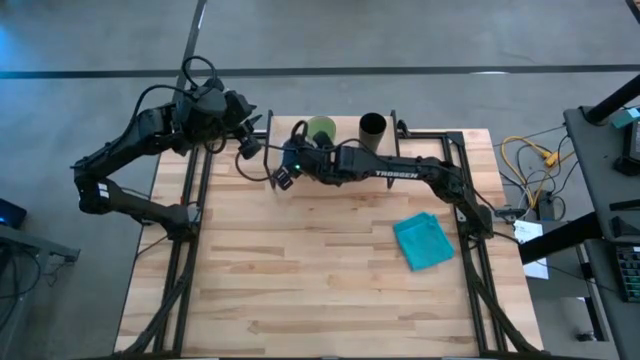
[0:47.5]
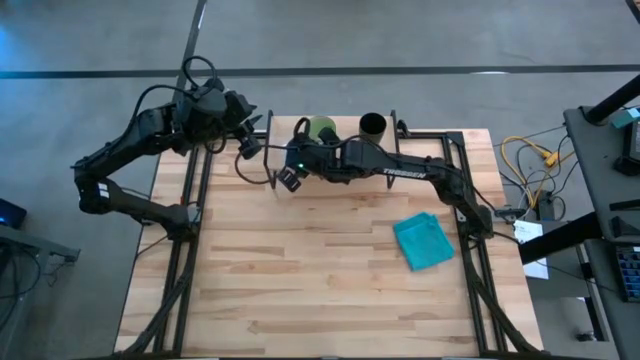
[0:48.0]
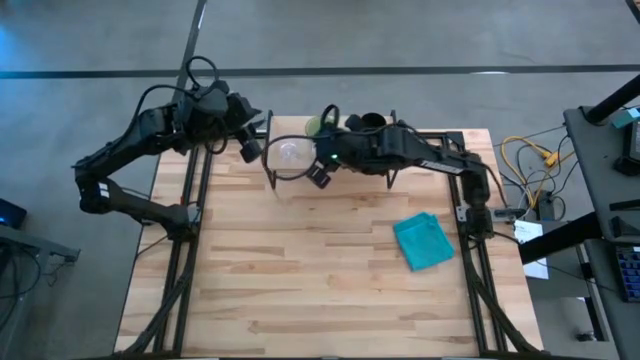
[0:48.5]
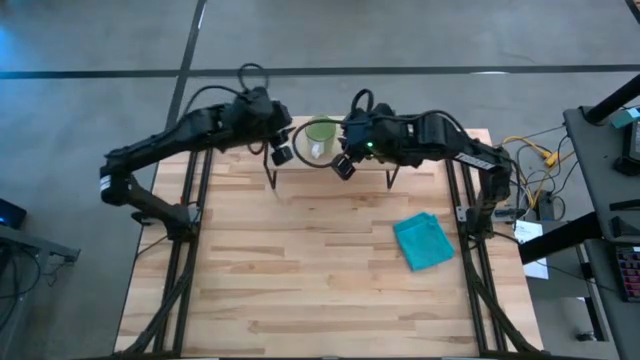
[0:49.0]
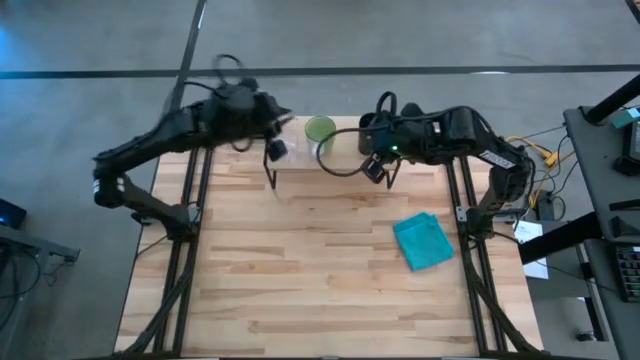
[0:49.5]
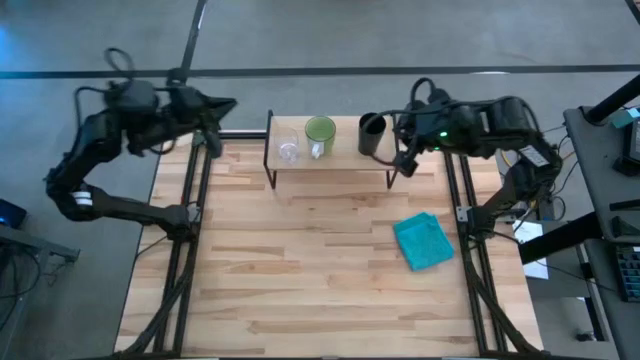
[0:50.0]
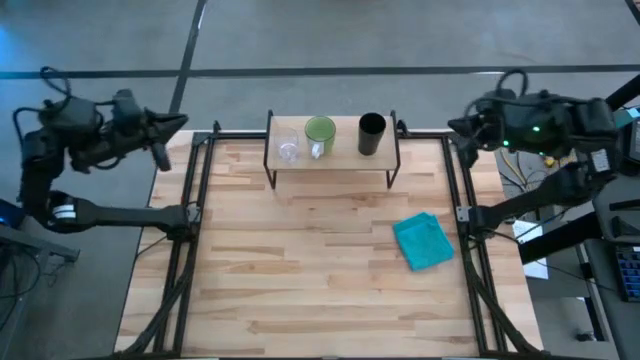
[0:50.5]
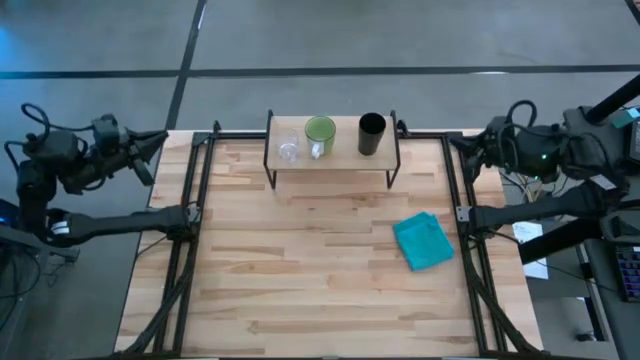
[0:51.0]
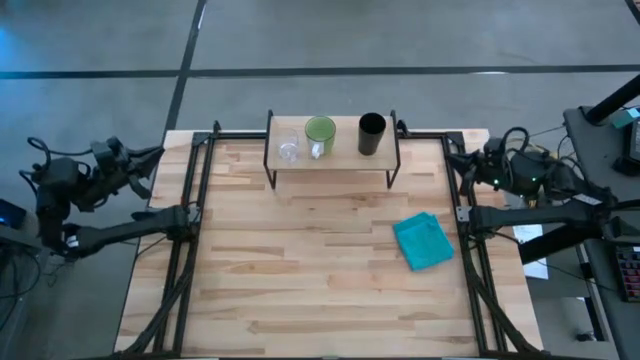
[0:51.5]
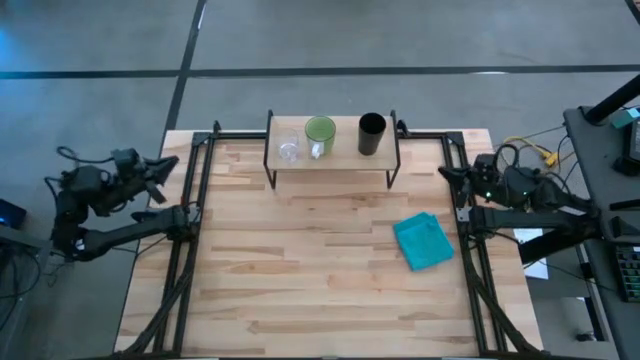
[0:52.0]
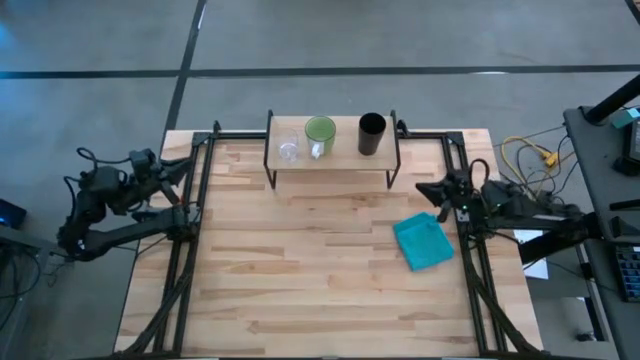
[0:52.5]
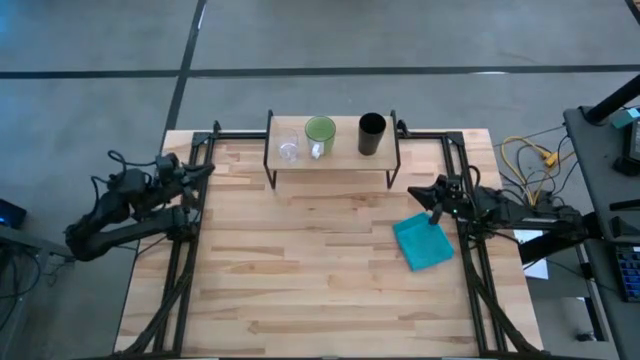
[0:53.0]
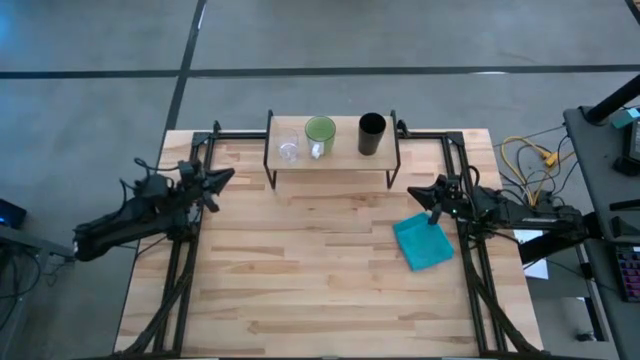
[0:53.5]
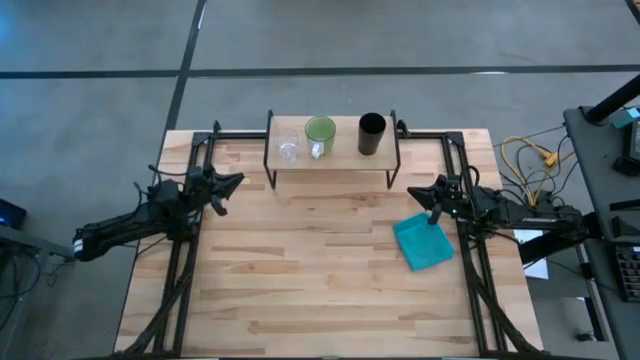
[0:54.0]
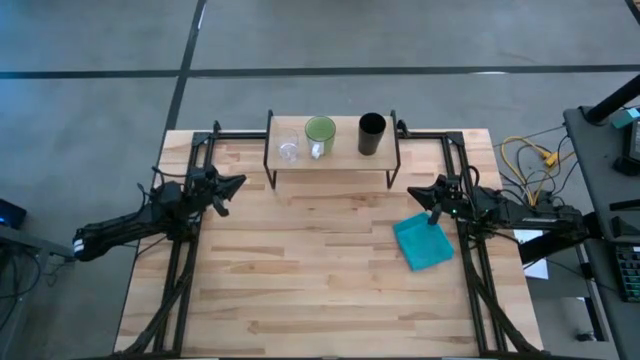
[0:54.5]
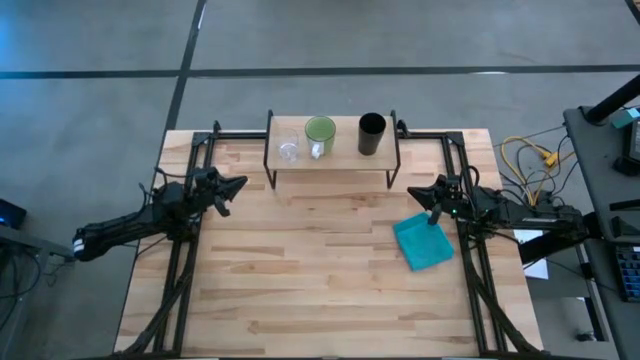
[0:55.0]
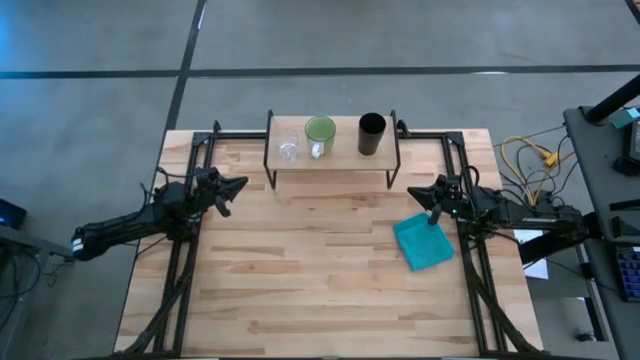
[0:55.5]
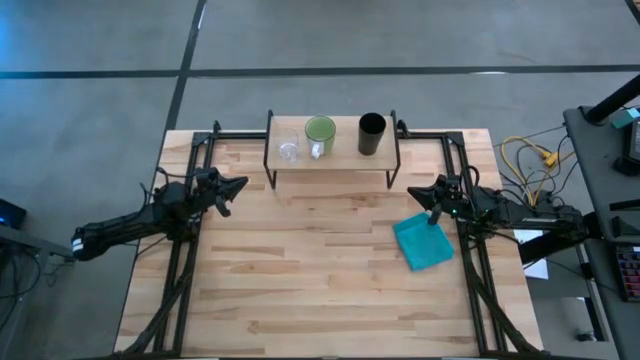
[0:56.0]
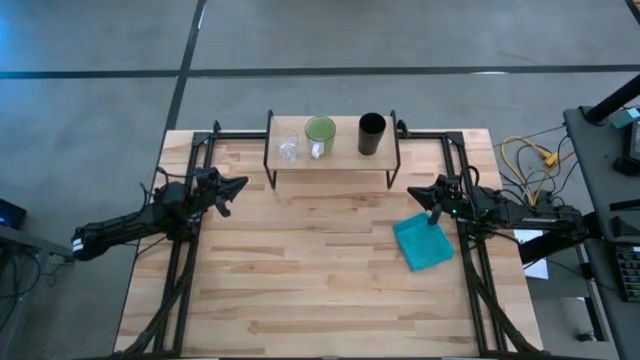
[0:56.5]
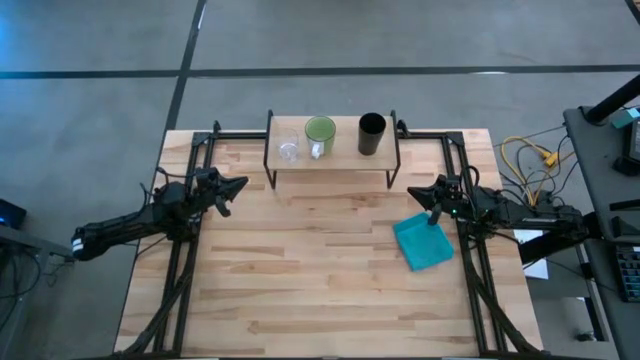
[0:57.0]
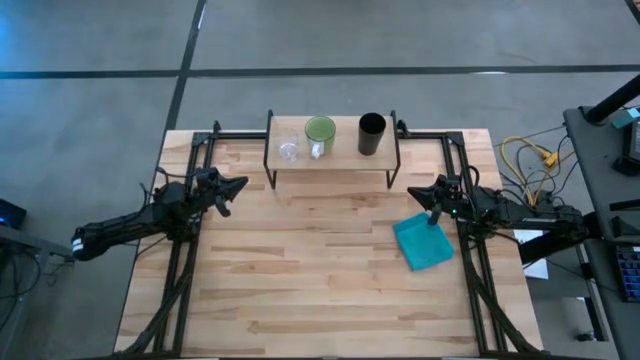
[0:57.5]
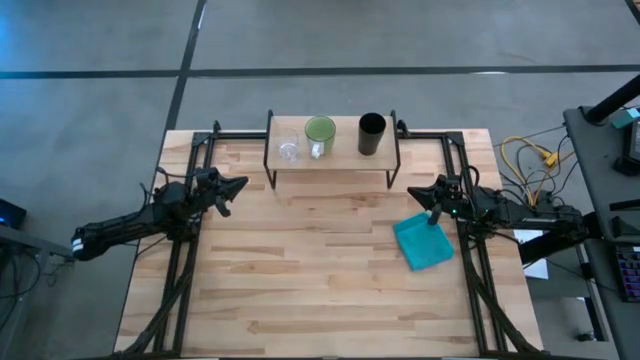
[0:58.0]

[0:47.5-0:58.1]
Task: Stack small to large cups/mugs on shelf
Return to Home Position

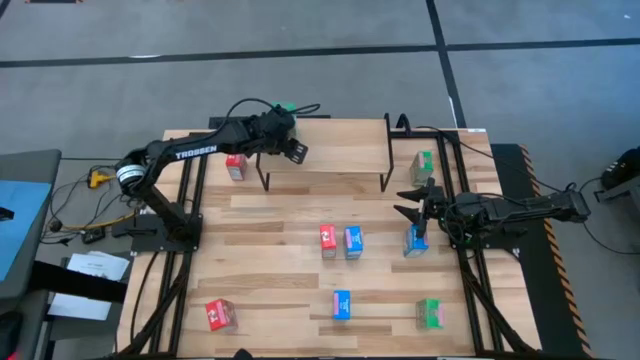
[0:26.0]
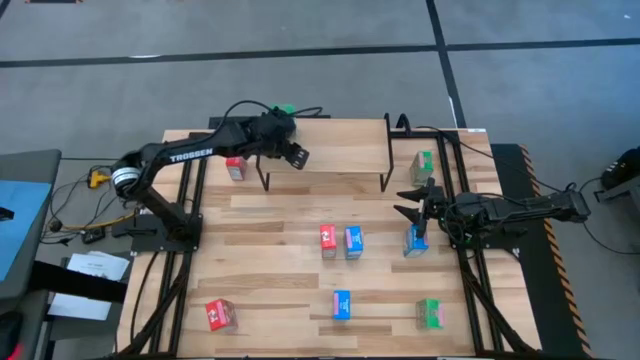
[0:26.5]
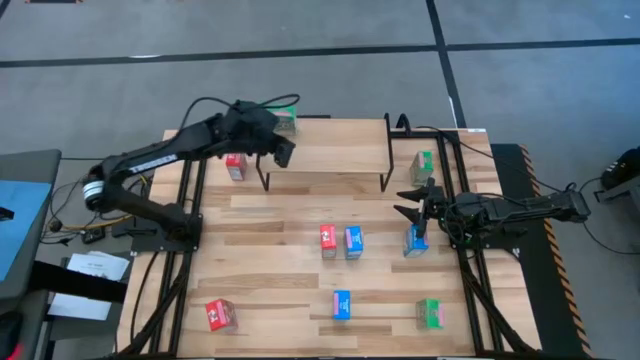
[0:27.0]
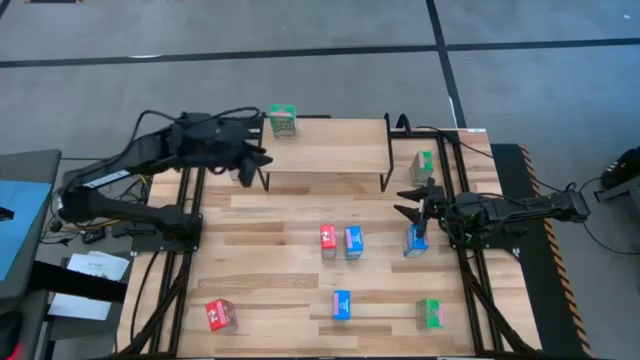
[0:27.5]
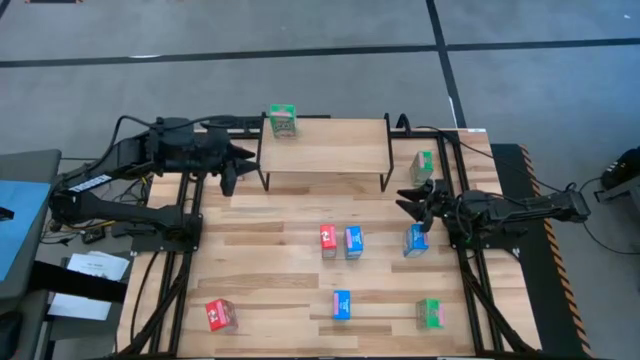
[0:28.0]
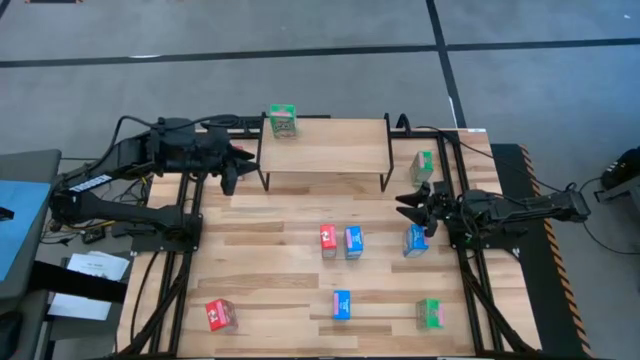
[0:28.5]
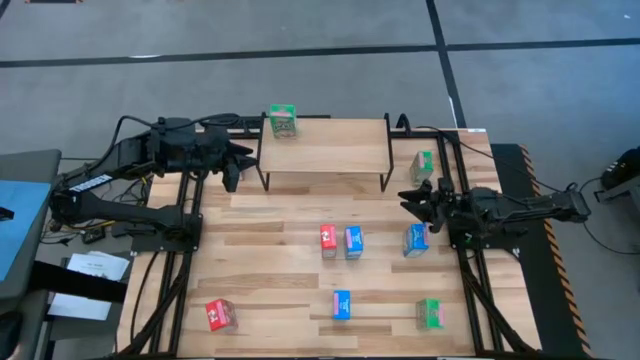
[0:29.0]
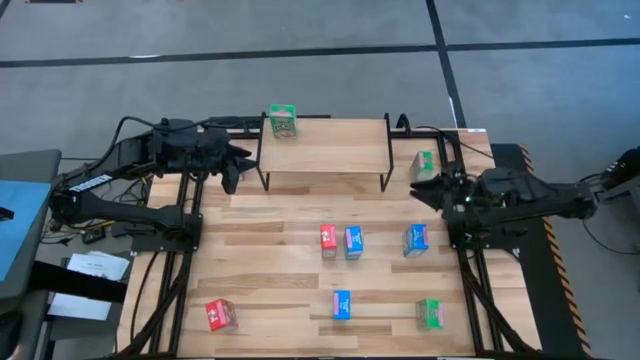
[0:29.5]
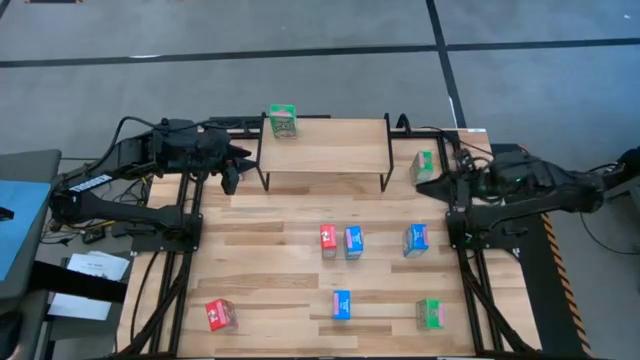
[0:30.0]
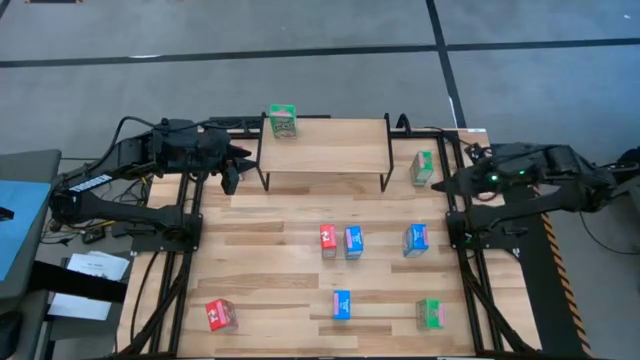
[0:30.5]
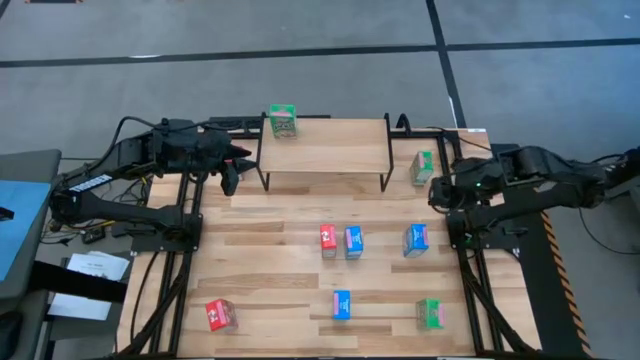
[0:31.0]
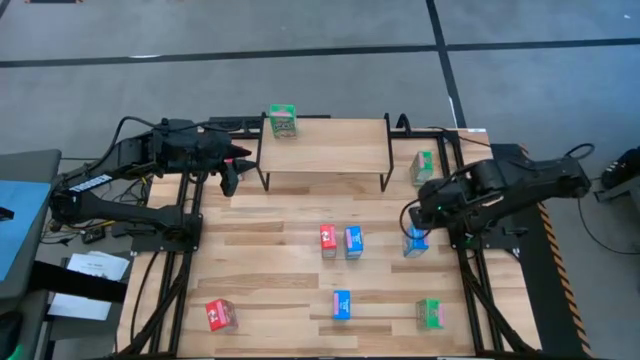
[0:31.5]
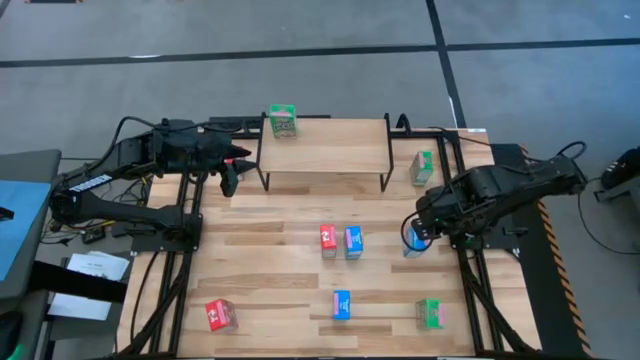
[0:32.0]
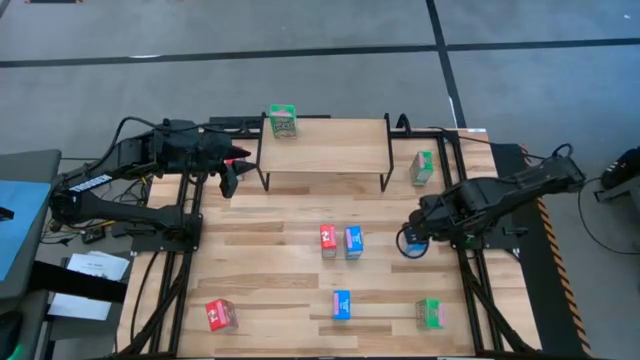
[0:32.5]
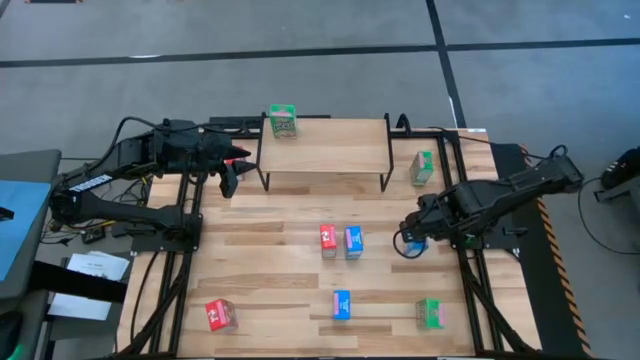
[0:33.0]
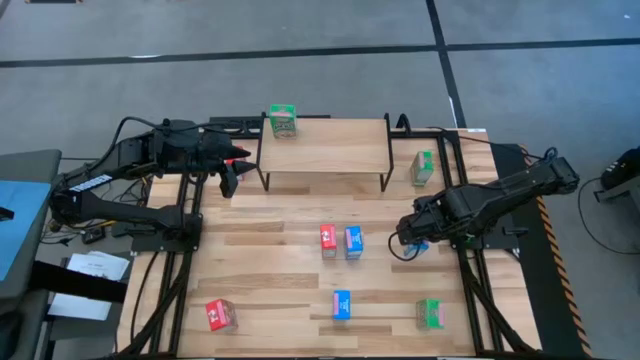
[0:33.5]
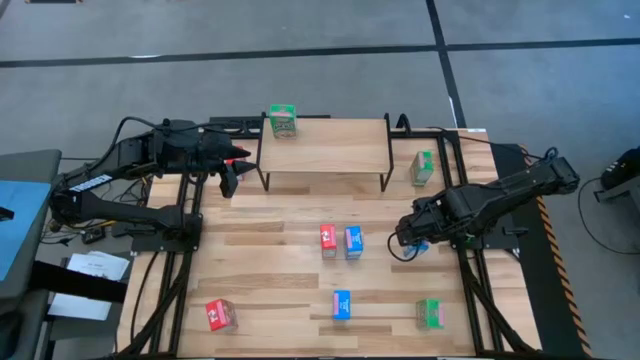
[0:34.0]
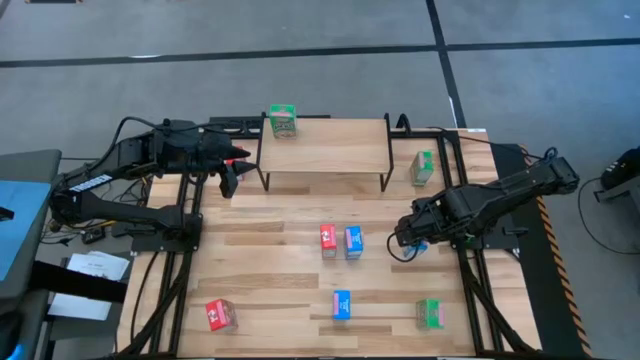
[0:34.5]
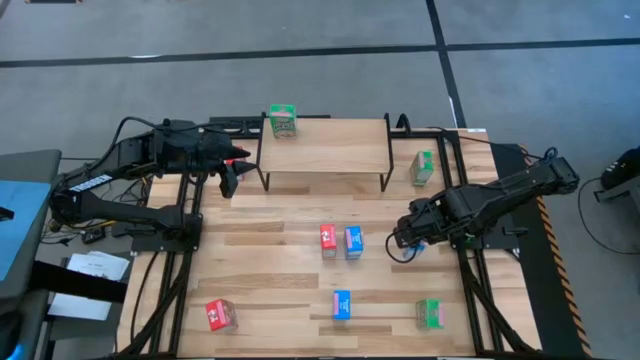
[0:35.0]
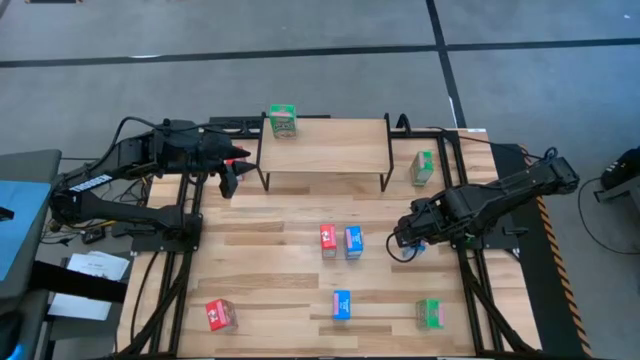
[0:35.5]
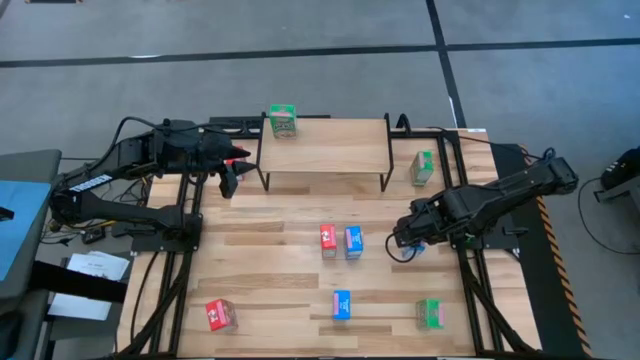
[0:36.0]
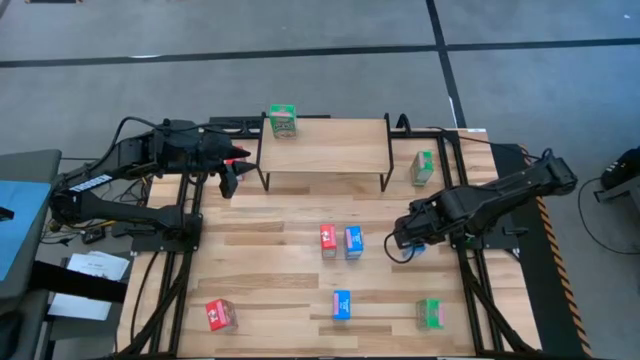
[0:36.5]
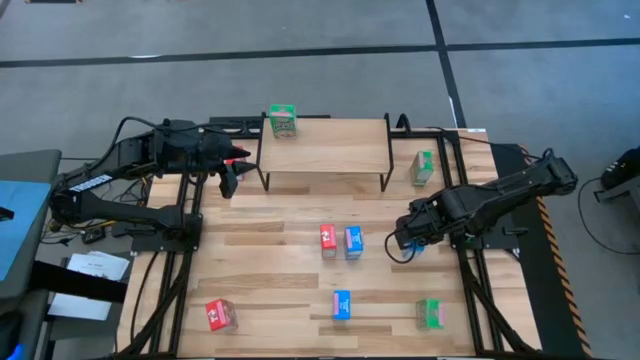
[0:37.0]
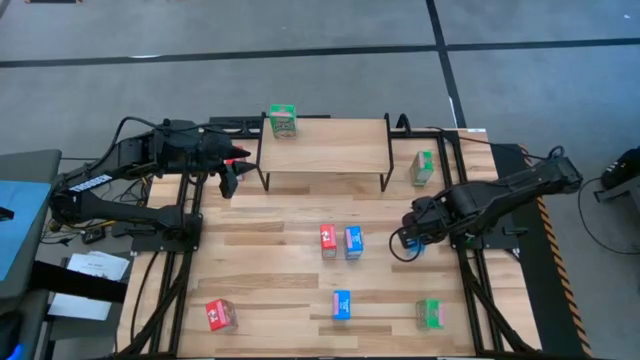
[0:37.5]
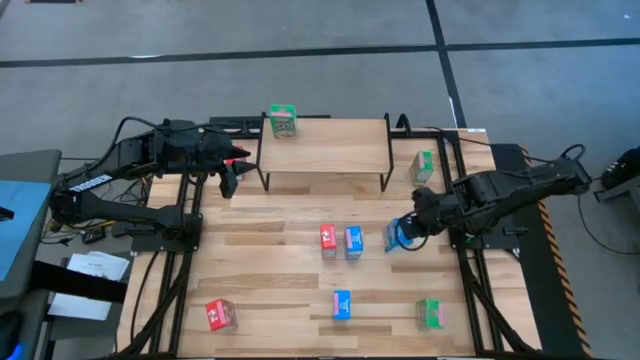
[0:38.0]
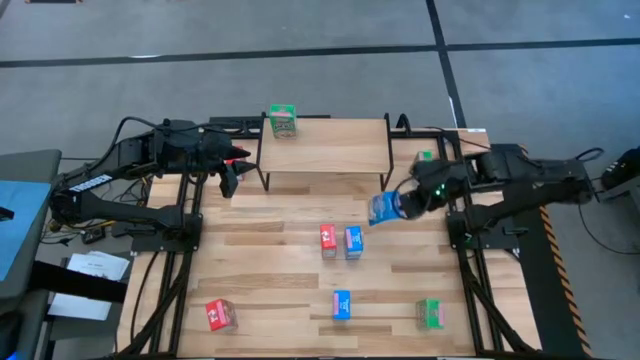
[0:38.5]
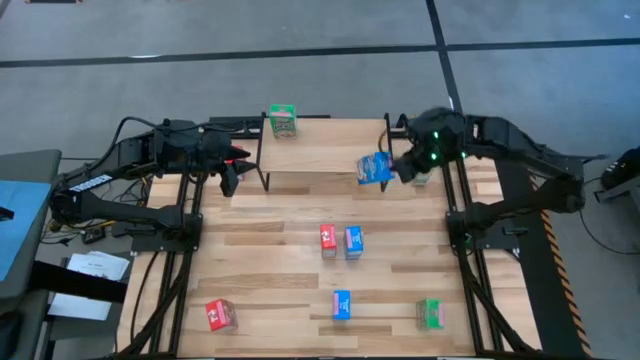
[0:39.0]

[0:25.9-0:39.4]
Task: Stack cereal on shelf
Put the top right blue cereal box on the shelf
